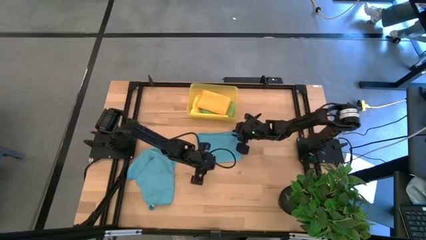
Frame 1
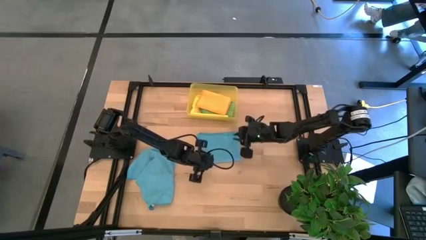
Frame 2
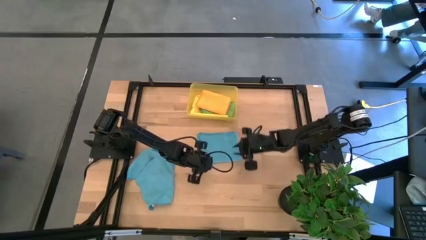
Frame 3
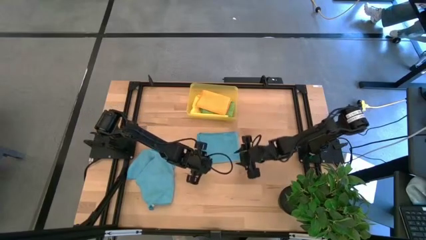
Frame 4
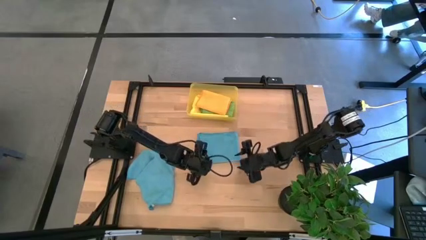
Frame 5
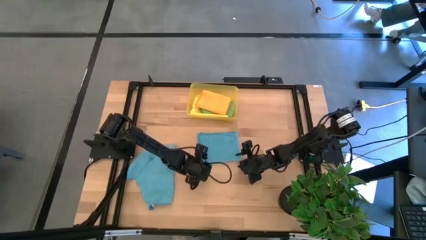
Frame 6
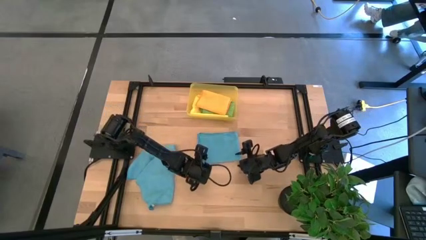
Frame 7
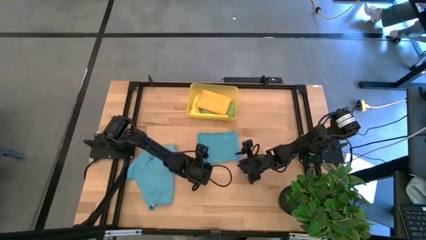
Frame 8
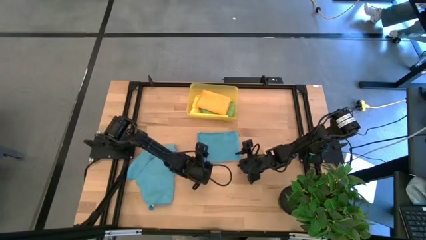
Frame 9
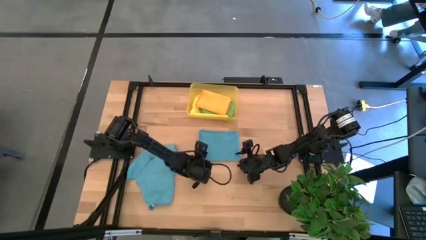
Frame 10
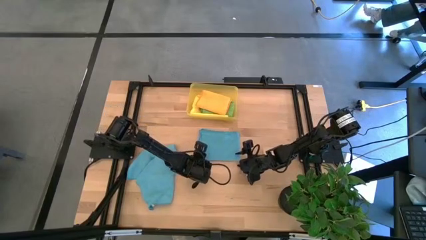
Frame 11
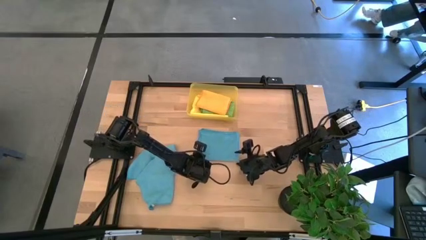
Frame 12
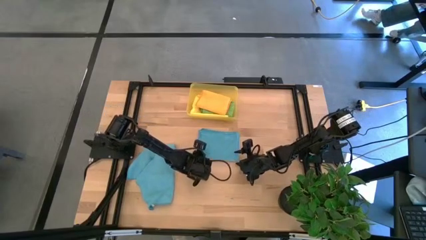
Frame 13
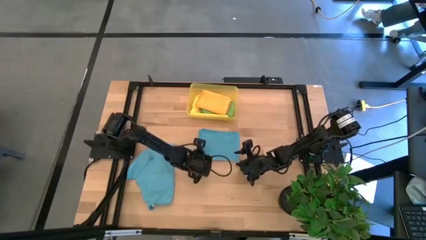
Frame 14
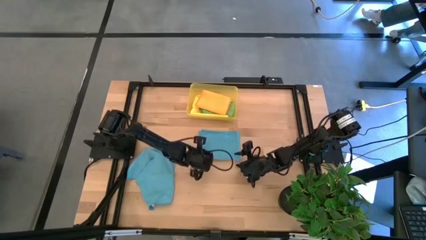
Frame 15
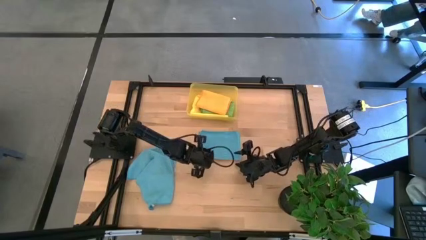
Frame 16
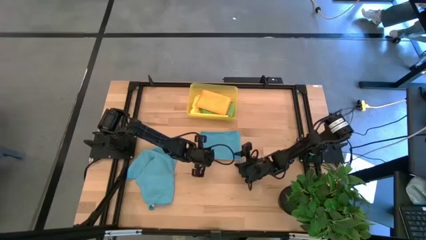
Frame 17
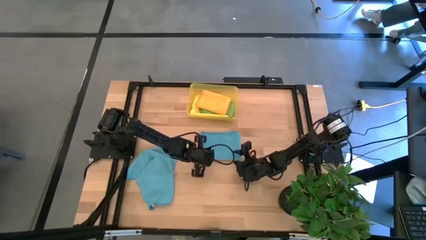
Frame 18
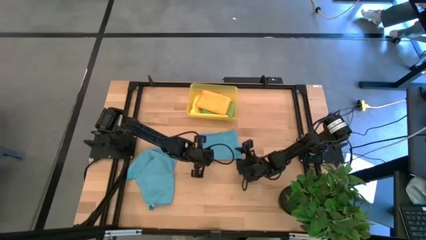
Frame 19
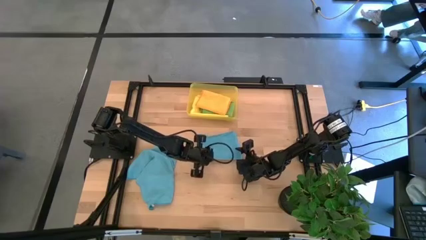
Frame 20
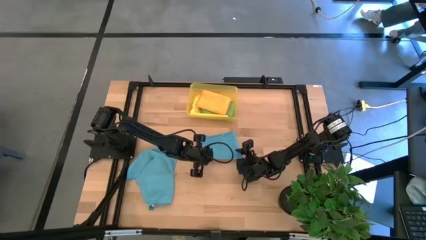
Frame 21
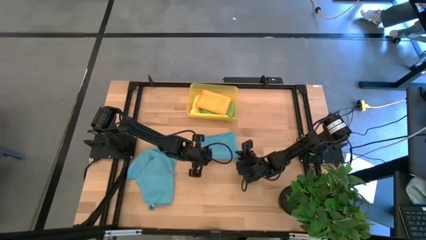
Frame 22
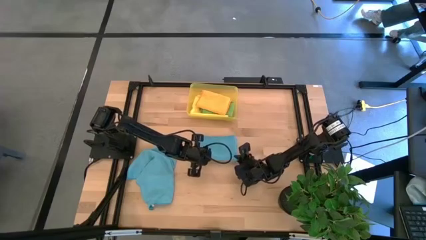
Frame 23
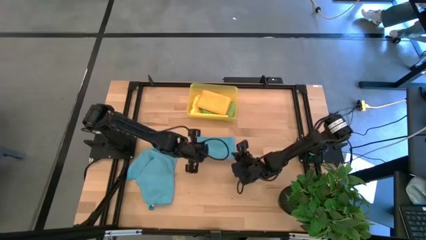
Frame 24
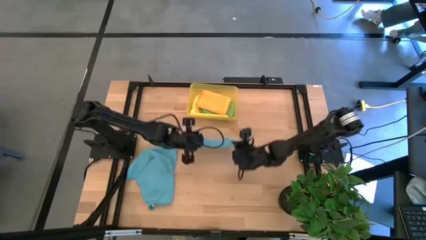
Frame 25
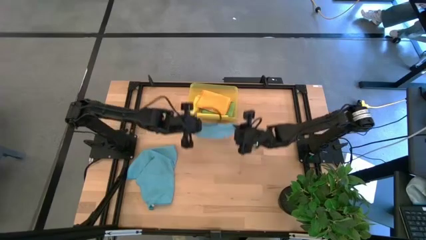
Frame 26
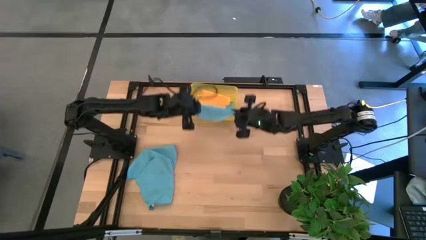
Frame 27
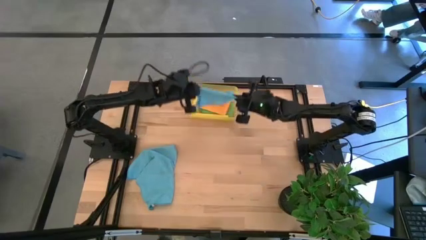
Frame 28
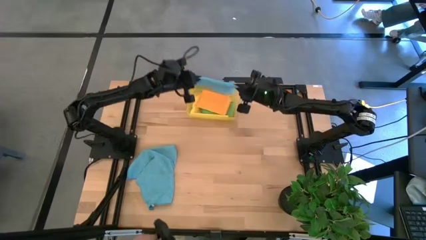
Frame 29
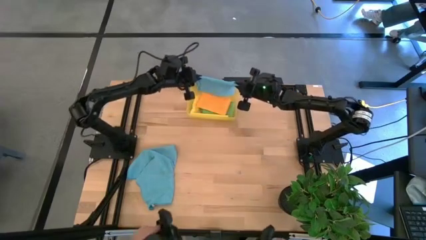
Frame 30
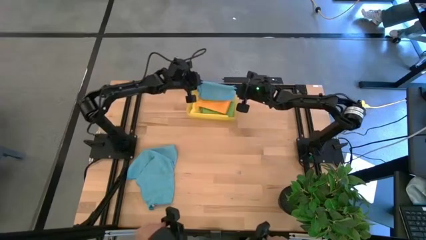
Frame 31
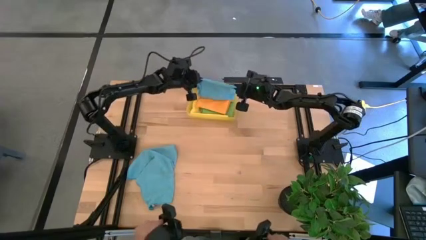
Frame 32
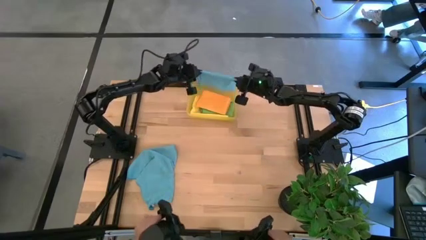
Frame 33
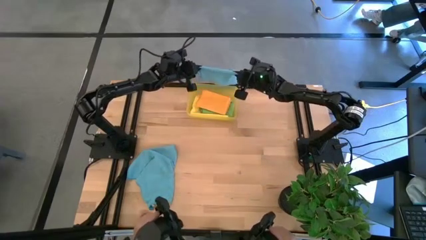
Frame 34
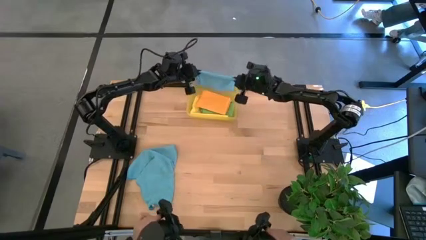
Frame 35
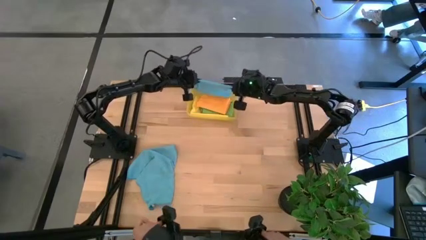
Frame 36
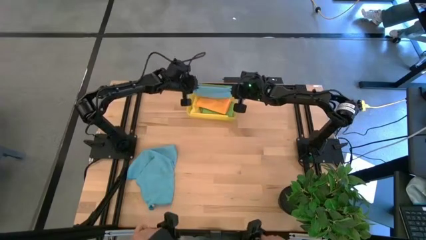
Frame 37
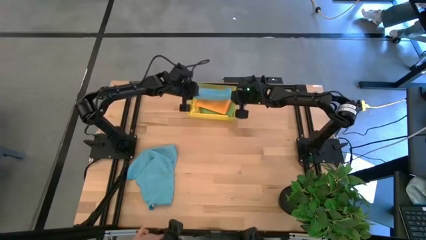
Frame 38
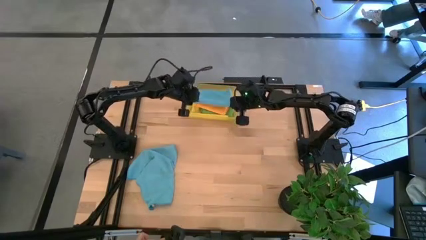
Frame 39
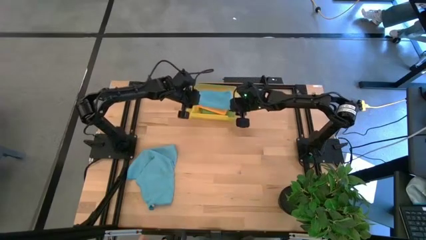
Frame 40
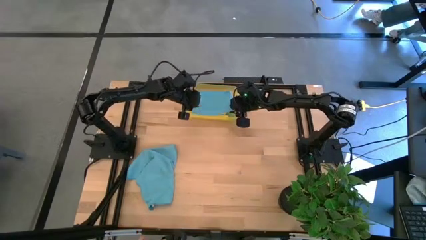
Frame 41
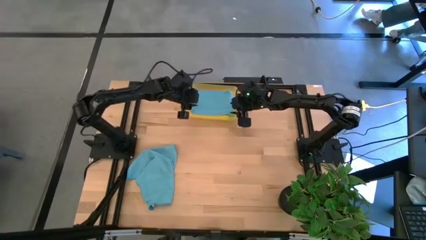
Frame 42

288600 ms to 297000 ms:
Task: Fold microfiber towels
Put the blue towel into the yellow bin

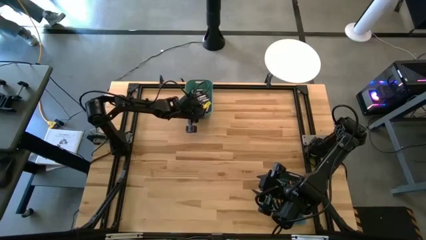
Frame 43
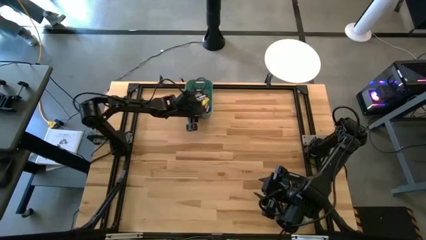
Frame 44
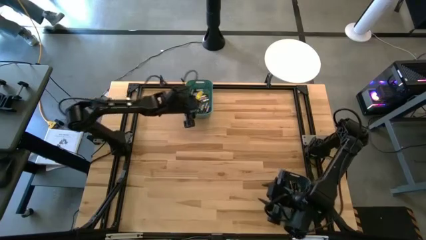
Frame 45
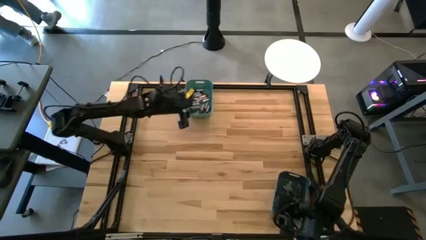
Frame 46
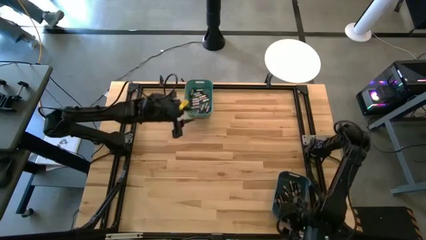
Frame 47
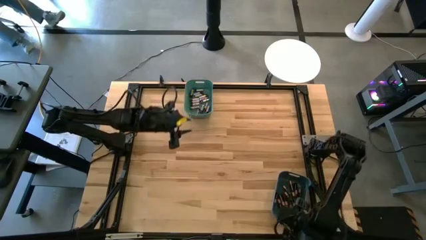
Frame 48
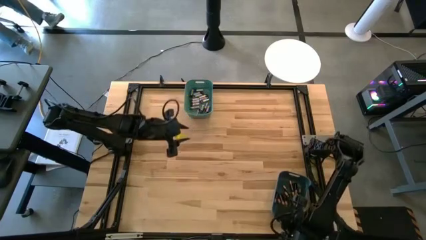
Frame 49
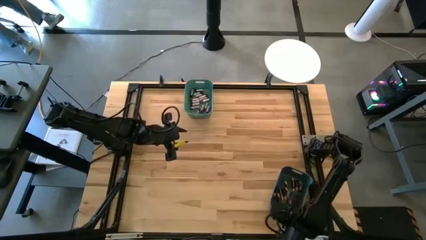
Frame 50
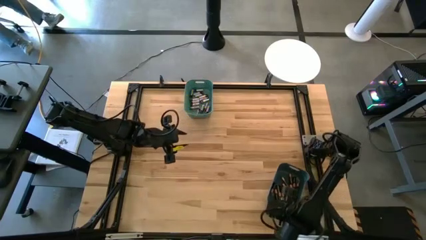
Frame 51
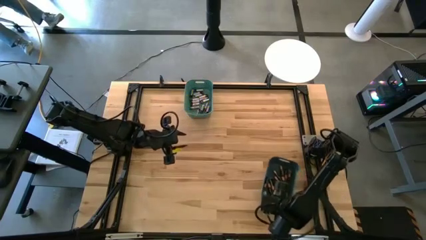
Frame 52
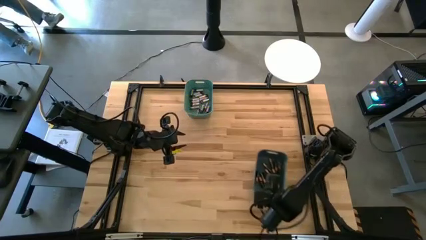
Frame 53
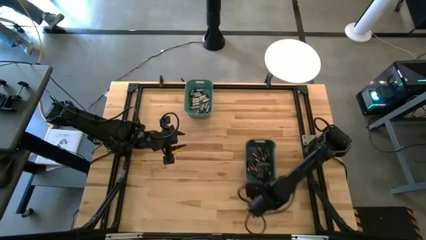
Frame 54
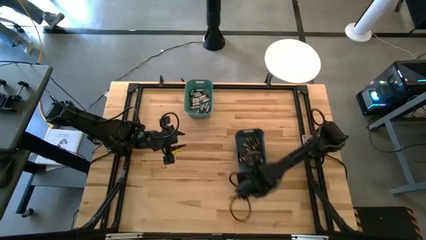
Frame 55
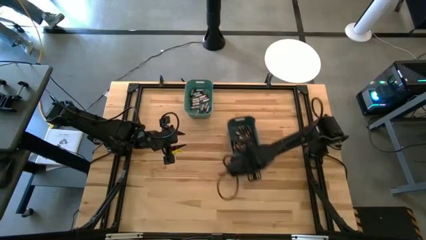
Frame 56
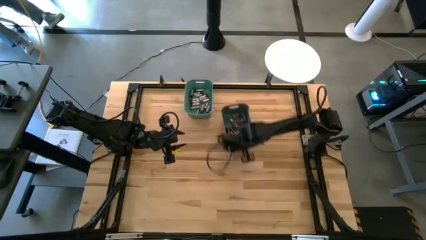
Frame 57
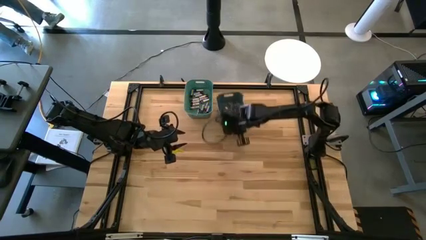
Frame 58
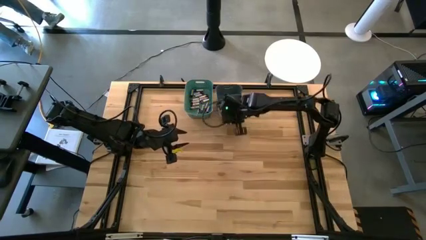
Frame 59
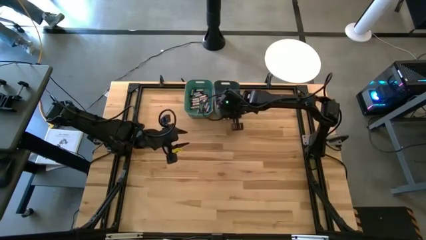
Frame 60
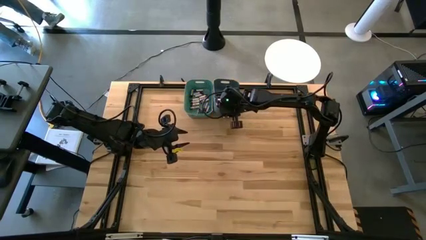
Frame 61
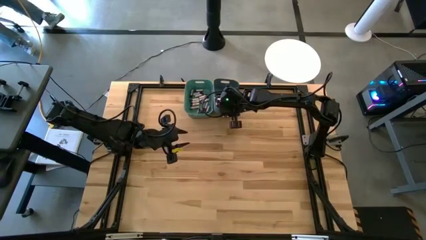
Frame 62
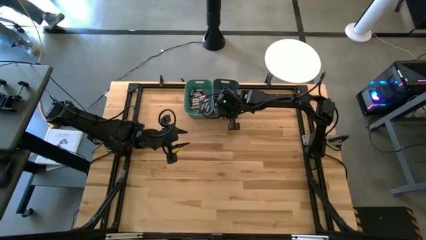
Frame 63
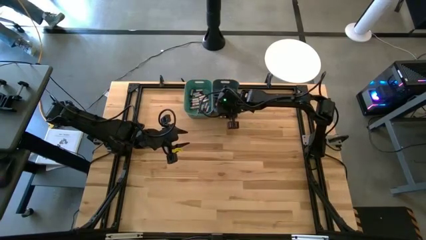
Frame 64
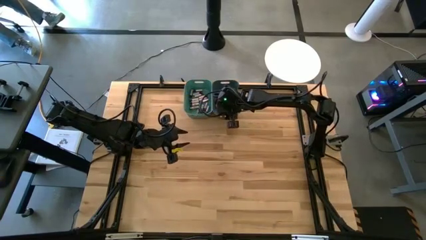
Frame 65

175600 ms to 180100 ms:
Task: Sort batteries
Move the blue bin to the right of the green bin on the table
